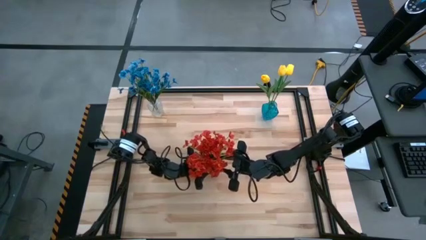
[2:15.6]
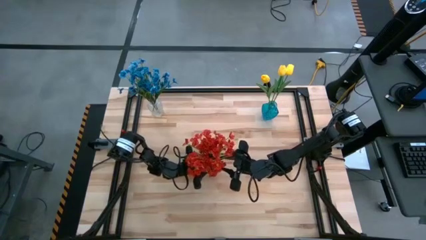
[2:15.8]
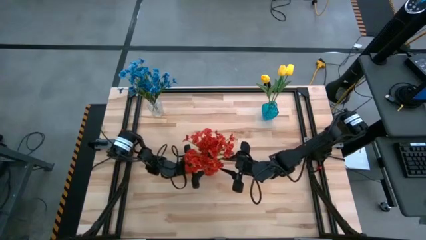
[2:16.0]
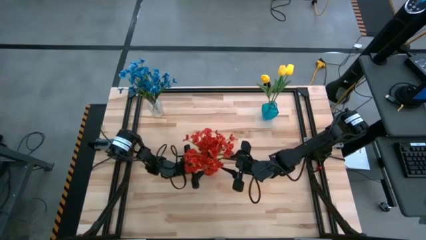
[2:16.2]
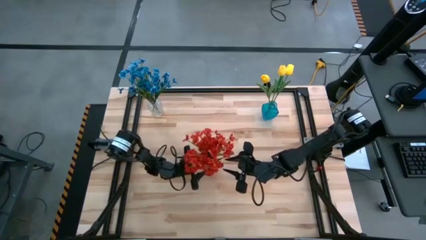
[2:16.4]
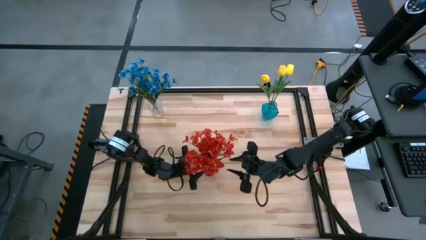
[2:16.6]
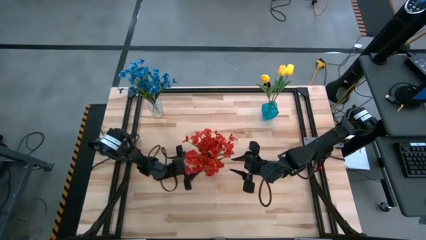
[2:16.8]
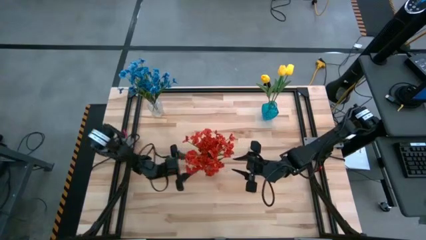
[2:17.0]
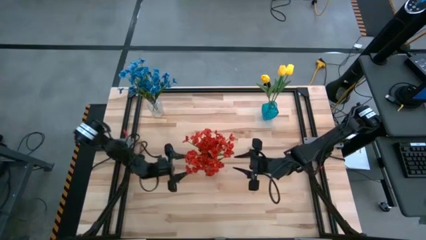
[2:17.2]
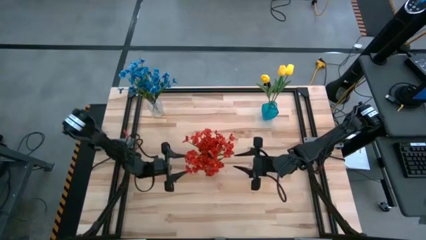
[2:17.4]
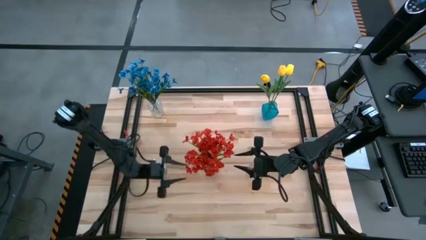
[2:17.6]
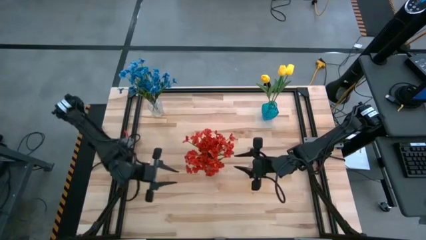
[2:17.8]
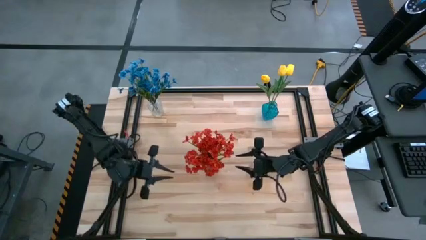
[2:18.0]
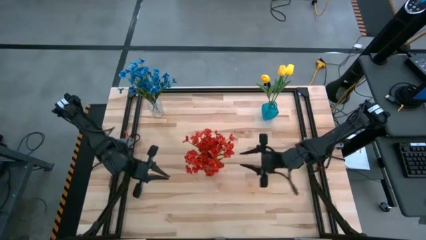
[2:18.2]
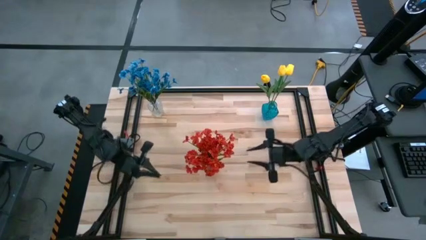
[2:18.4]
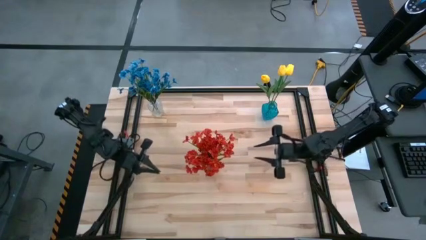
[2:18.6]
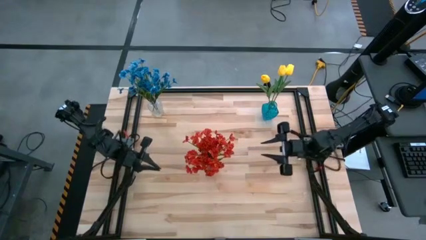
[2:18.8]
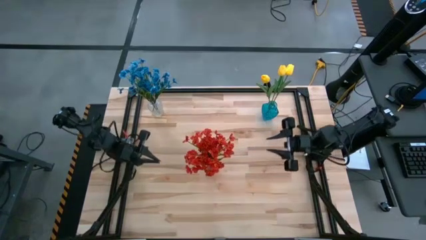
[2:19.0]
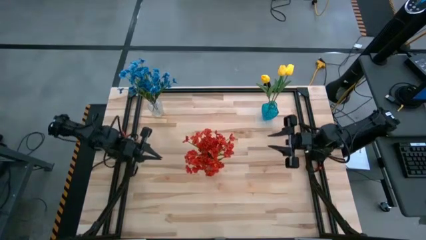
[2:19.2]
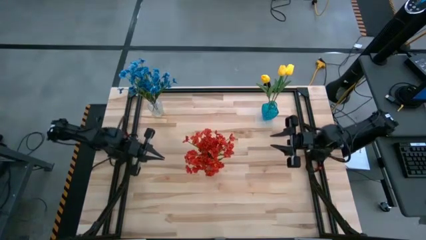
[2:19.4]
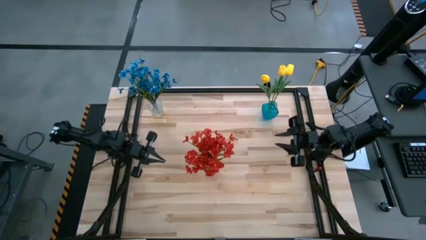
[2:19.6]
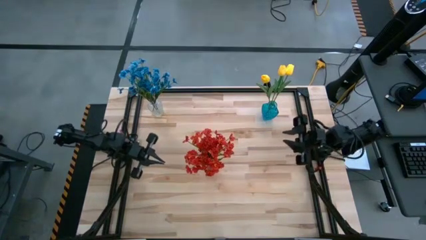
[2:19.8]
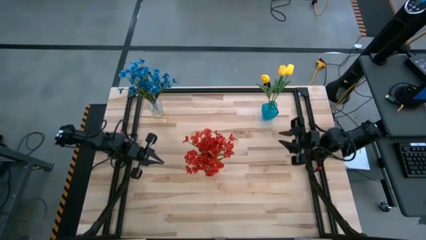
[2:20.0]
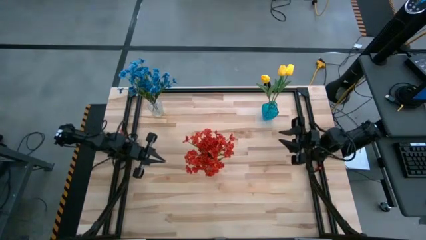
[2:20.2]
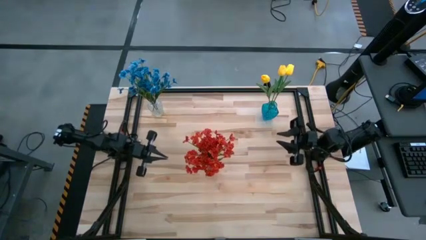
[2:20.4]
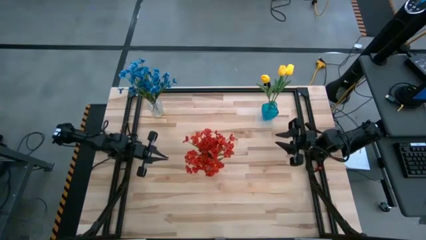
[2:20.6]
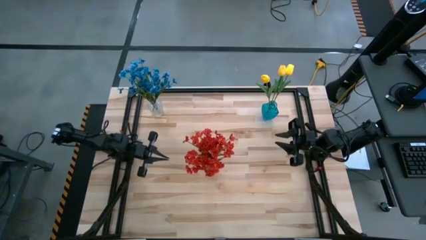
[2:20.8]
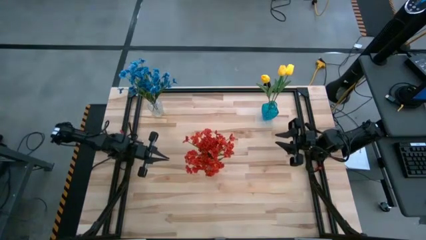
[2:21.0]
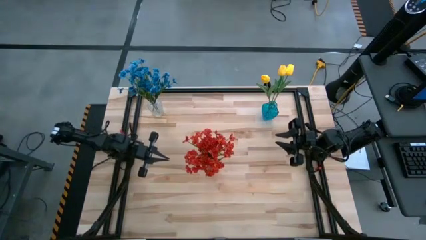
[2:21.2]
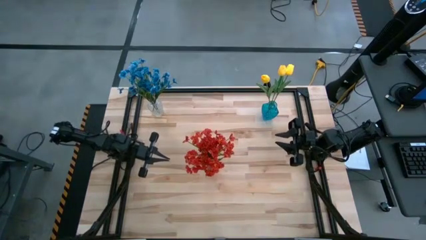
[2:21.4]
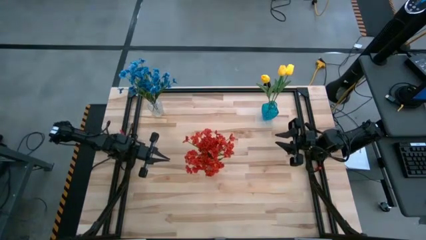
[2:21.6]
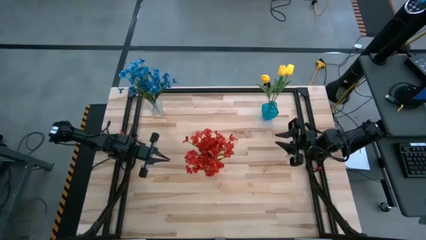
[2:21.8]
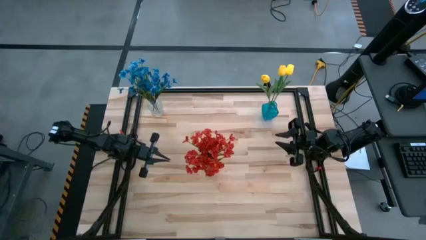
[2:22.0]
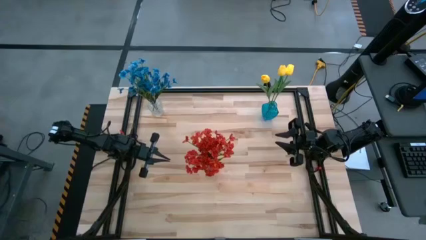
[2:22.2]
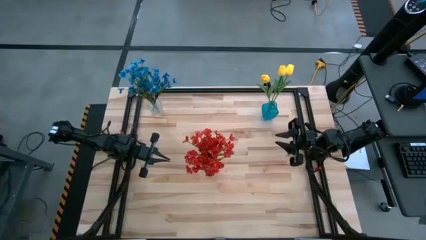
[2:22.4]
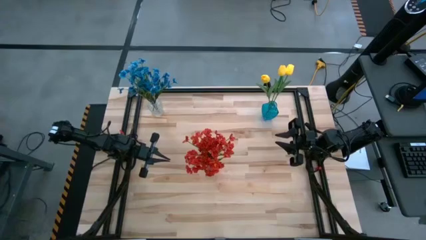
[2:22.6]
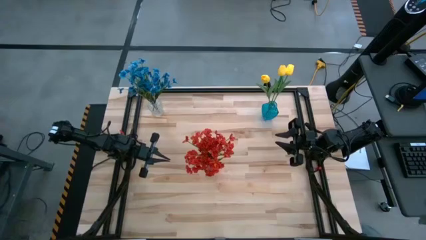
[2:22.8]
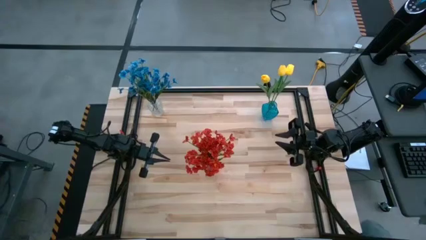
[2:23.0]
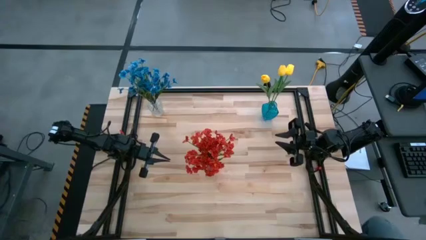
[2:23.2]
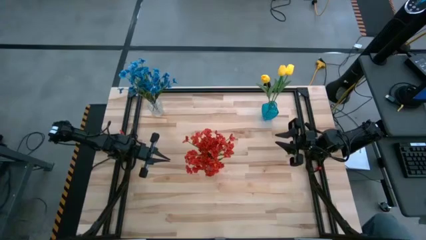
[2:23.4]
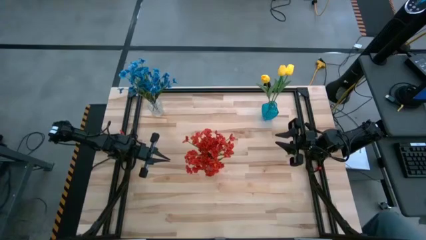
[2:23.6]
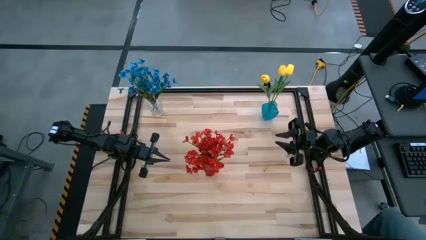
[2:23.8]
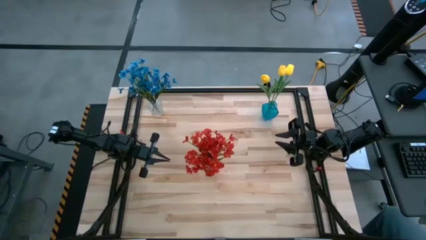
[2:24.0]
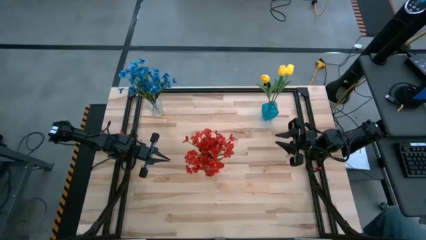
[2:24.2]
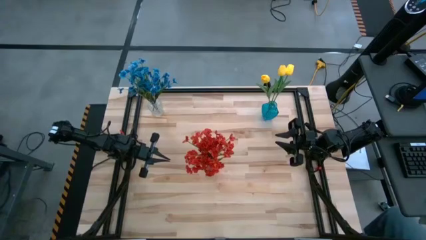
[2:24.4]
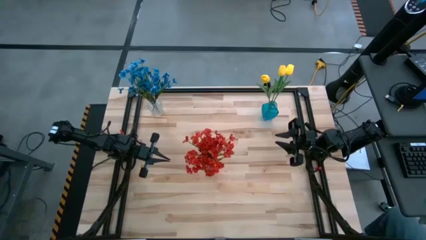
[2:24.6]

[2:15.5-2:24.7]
Task: Sort flowers into vase by color
Return to Home Position

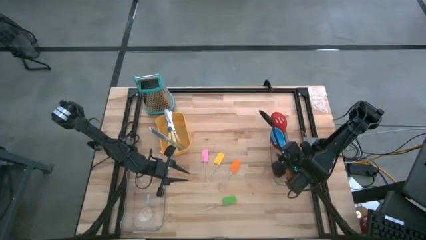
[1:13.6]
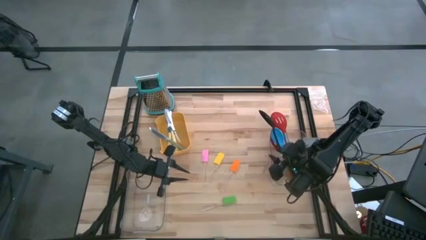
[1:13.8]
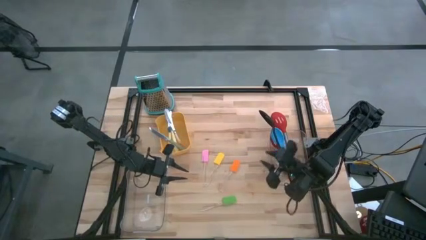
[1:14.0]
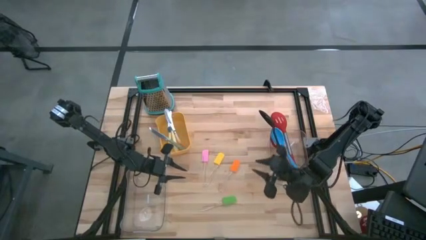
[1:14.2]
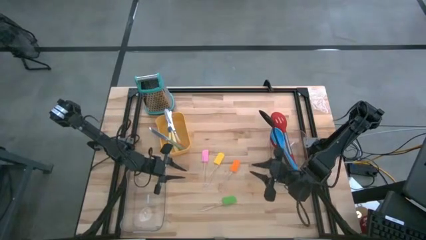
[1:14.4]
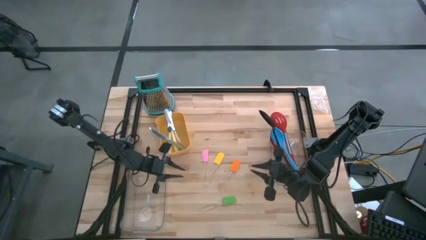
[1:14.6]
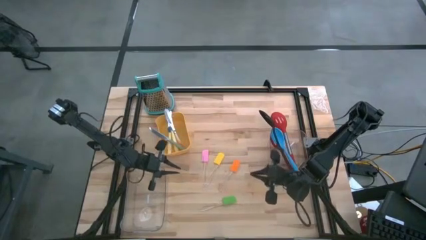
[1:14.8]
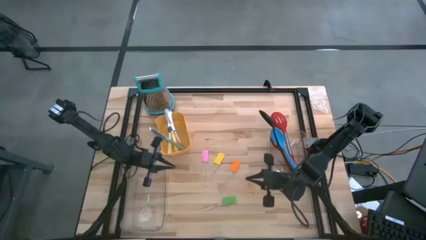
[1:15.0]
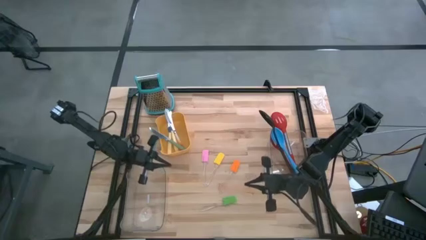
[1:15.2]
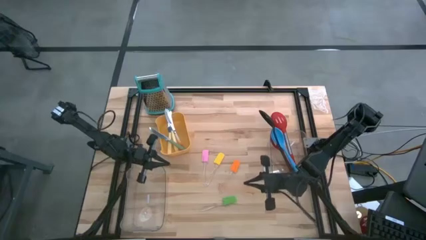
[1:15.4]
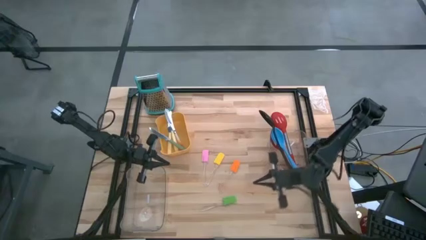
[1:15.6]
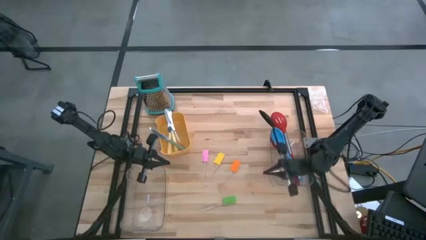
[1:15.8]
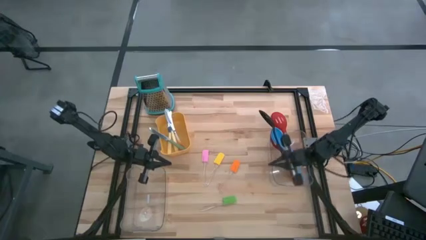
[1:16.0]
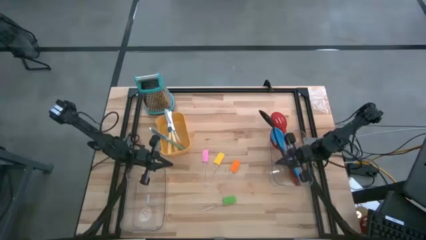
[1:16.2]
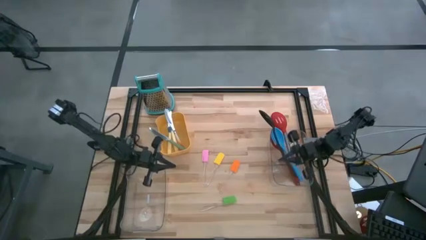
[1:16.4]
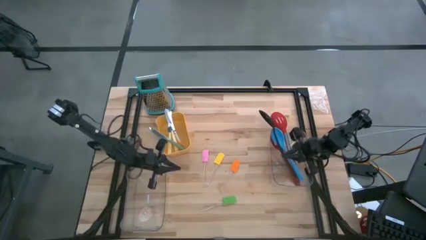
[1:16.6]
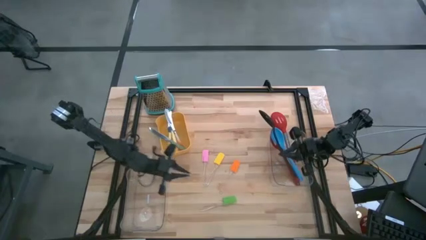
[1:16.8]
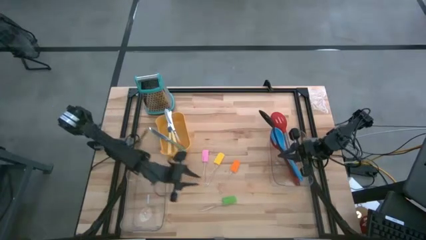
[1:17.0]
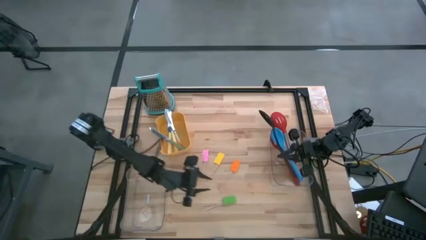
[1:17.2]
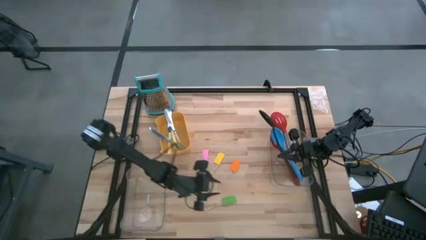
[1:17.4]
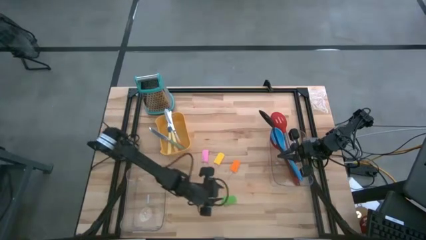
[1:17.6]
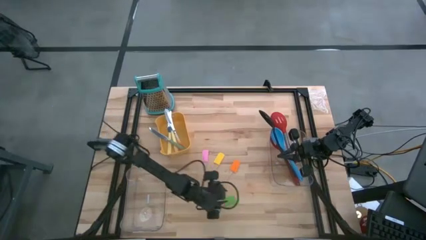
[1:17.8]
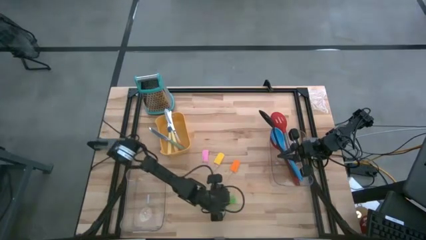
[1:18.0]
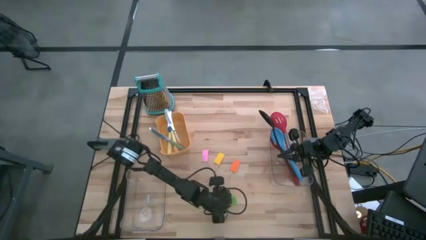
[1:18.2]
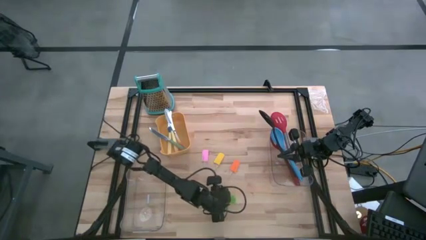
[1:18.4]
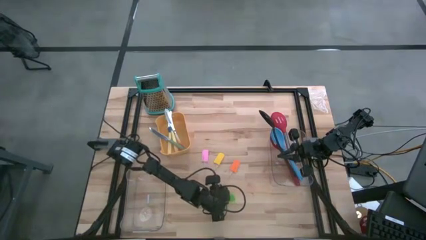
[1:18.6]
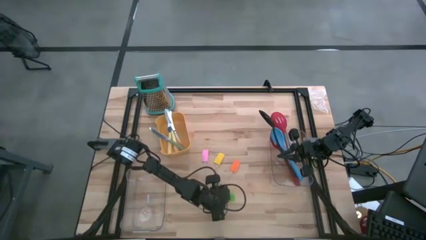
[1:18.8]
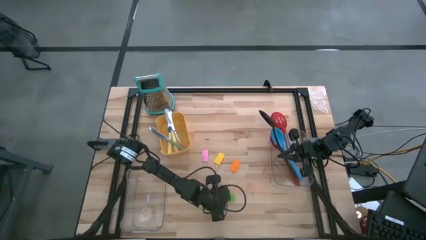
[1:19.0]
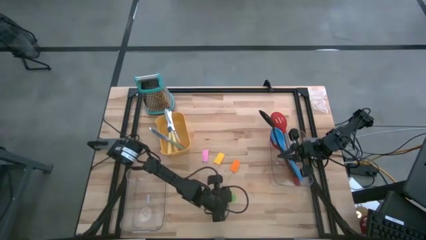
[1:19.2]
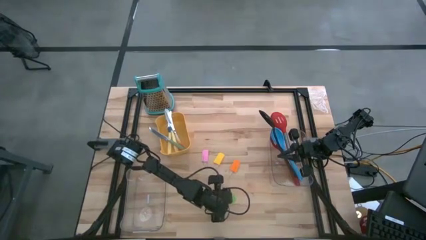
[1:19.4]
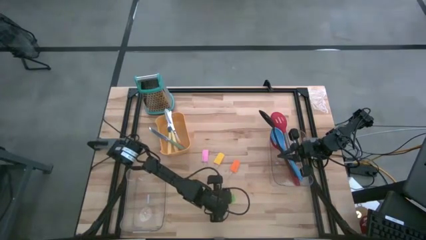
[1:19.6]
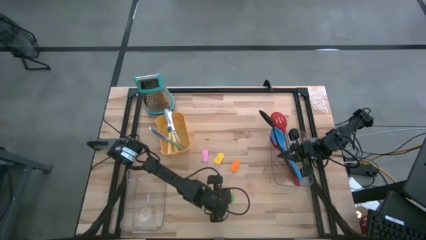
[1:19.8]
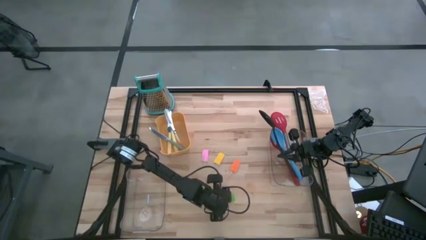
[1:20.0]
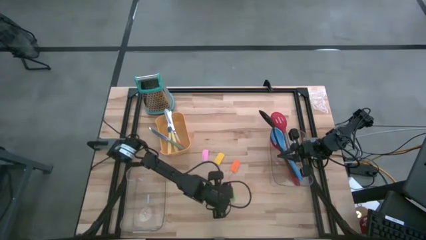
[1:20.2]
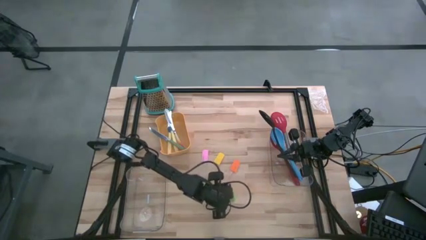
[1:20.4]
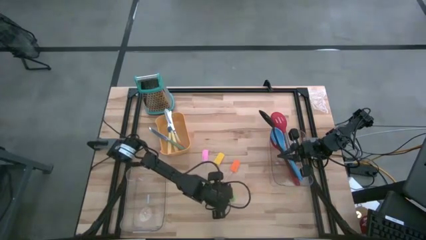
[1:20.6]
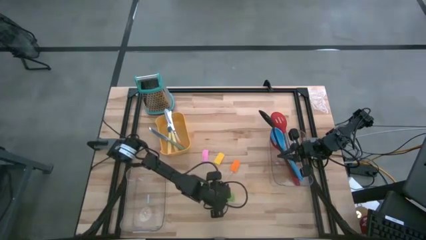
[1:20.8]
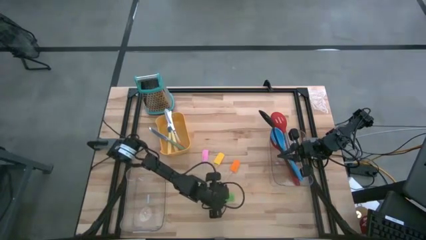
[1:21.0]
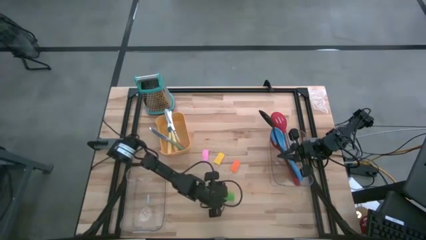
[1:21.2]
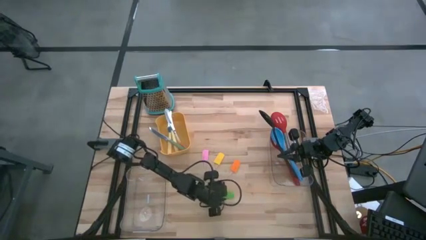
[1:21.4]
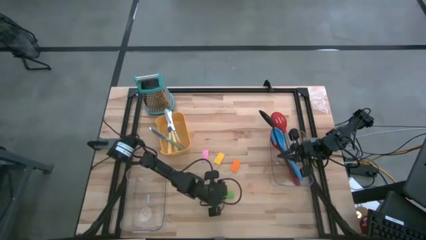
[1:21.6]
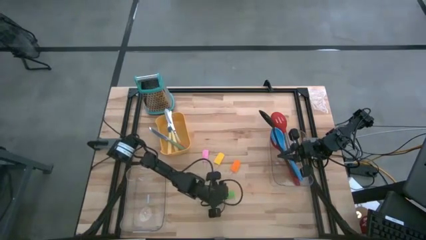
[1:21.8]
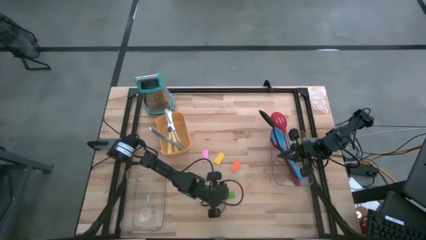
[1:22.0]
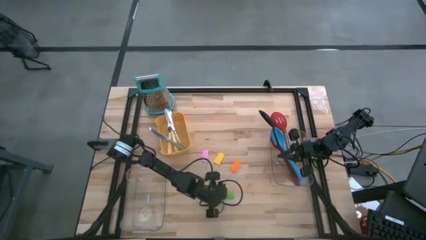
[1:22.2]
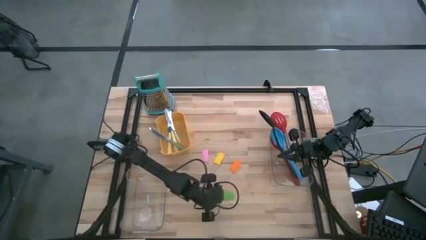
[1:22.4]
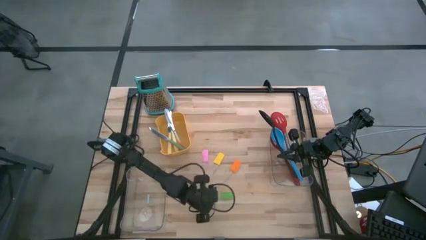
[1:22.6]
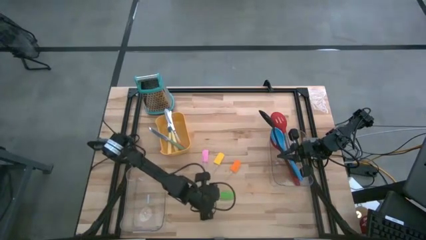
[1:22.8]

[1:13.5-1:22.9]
Task: Pick & Place Kitchen Items
Put the green spatula into the left transparent bin
